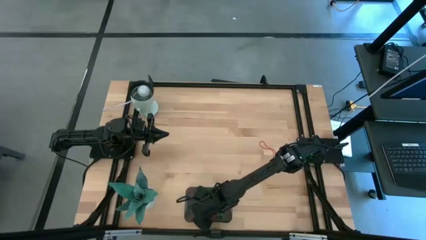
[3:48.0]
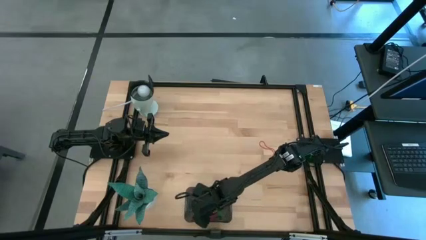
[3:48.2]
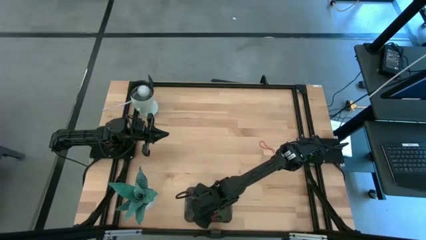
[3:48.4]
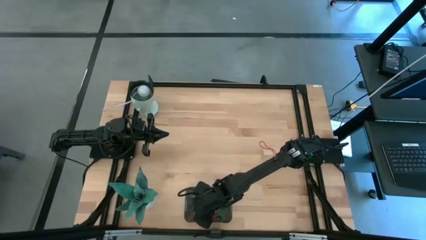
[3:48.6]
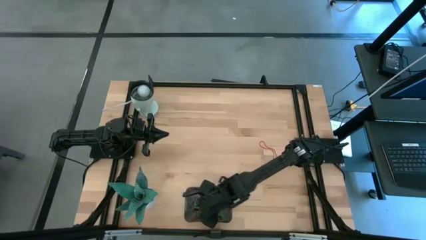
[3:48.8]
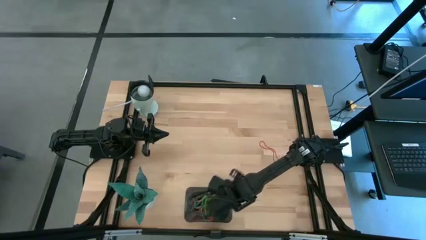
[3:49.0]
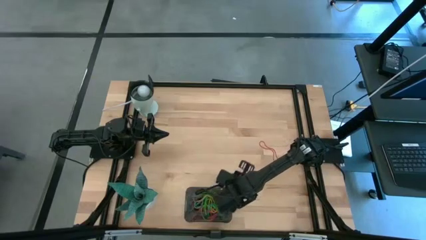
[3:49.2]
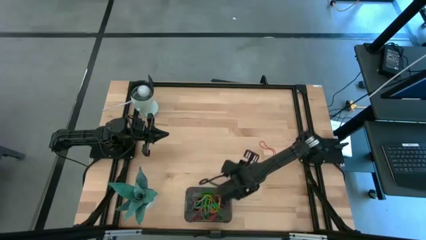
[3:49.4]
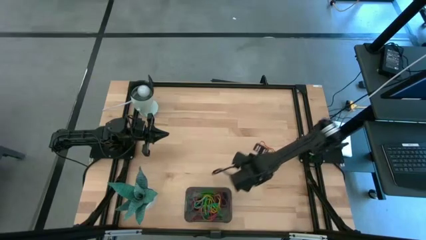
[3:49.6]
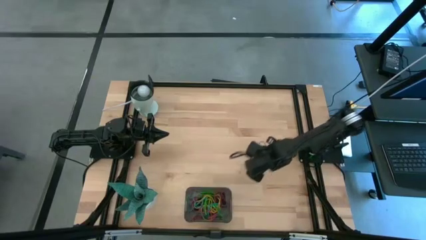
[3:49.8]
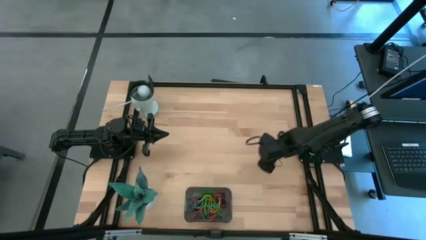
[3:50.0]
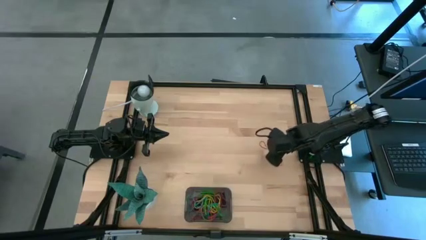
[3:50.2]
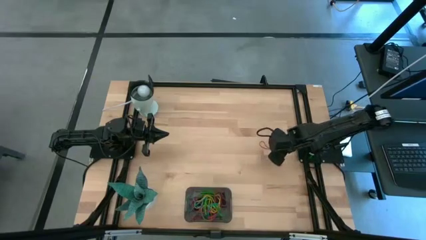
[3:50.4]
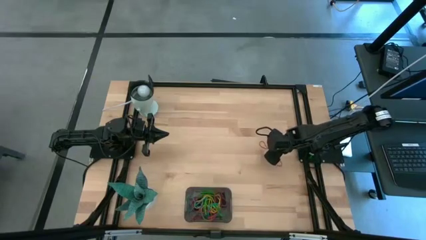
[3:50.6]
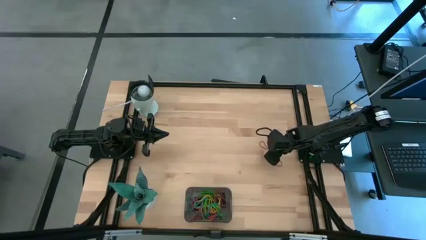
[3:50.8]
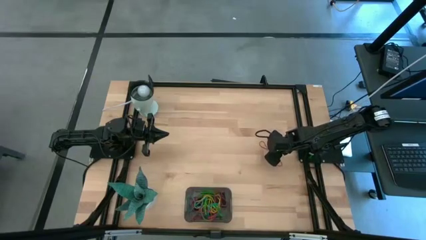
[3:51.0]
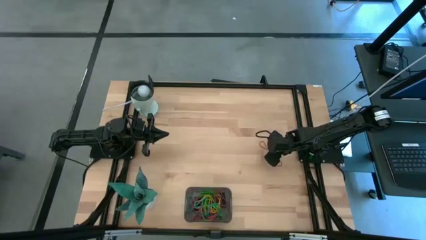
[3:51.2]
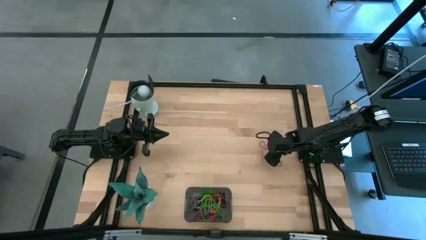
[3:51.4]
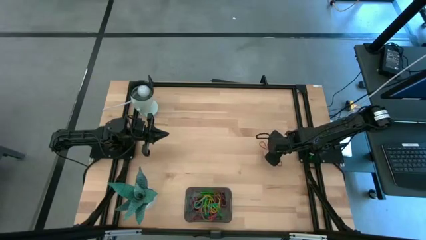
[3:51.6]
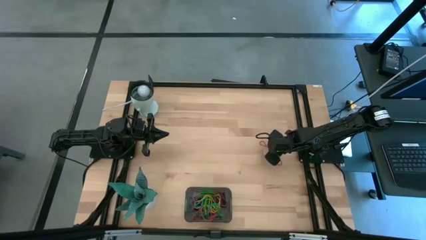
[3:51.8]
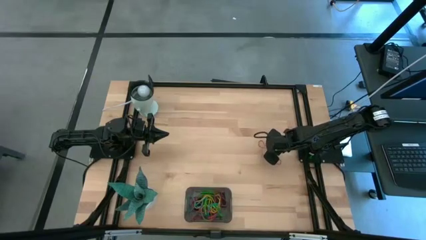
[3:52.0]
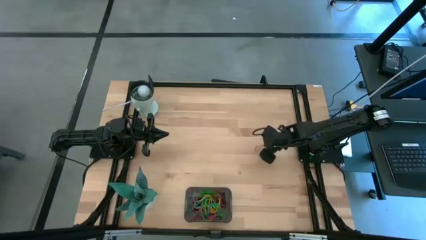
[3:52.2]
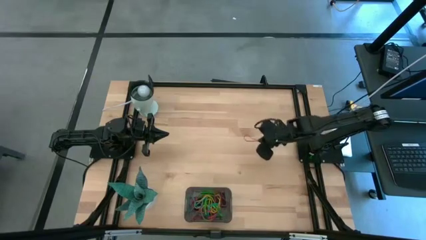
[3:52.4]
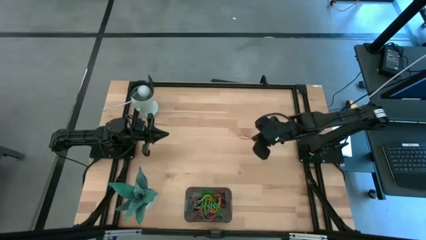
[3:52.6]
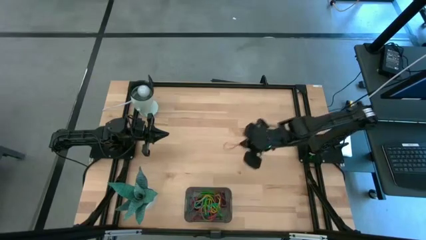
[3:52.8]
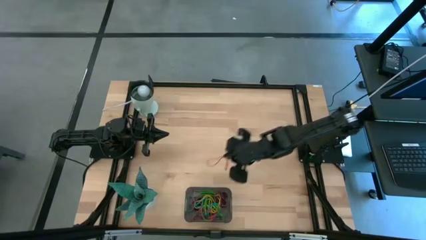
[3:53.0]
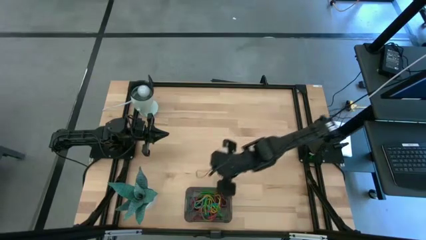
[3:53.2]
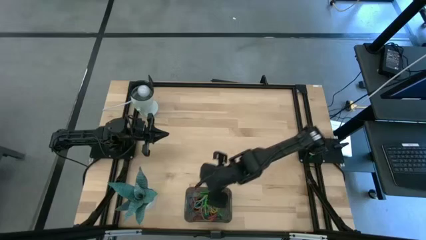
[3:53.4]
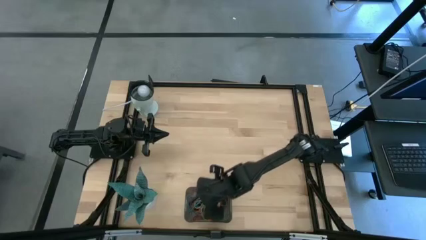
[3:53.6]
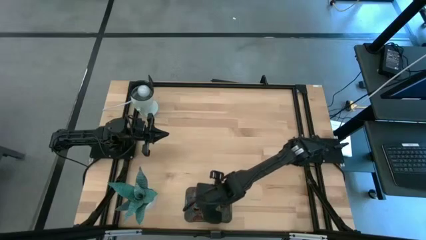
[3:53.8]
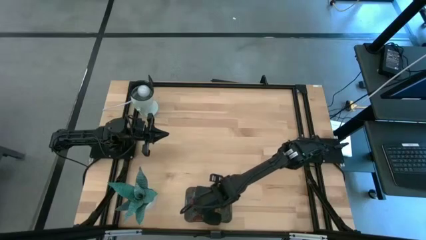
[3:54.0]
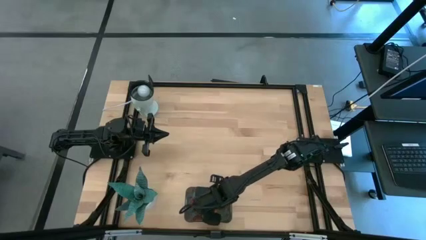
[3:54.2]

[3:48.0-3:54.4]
Task: Pick and place rubber bands into bin
Put the red rubber band into the black bin

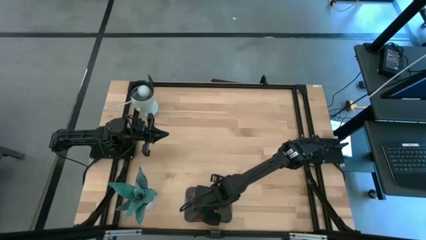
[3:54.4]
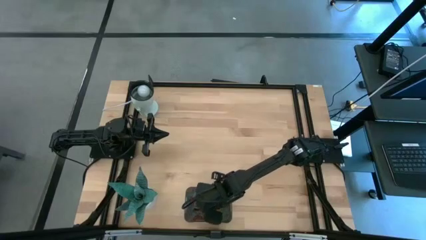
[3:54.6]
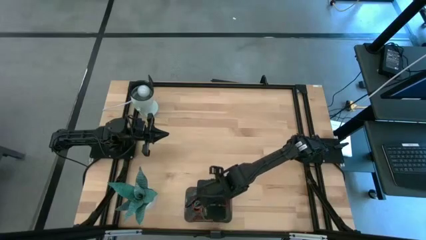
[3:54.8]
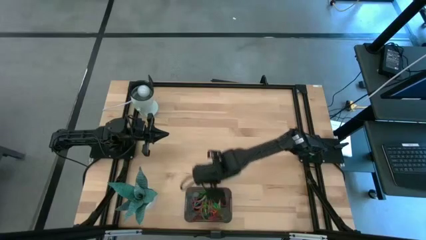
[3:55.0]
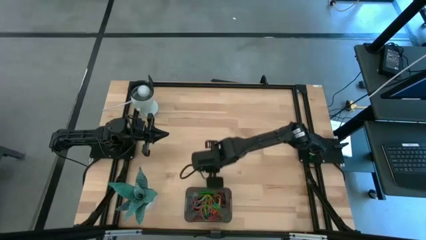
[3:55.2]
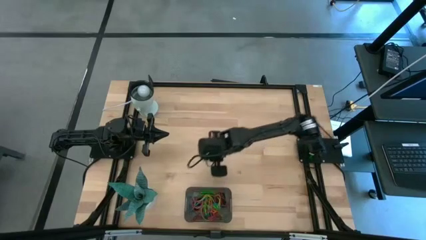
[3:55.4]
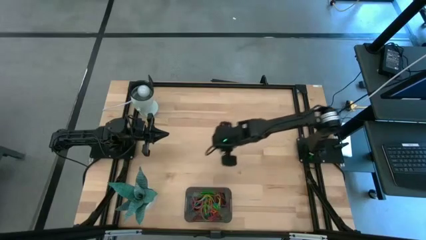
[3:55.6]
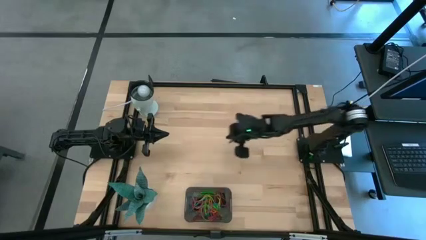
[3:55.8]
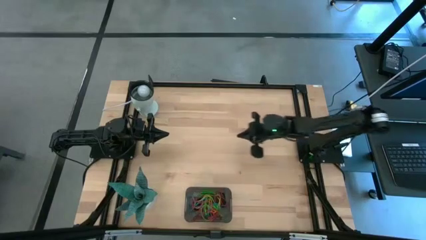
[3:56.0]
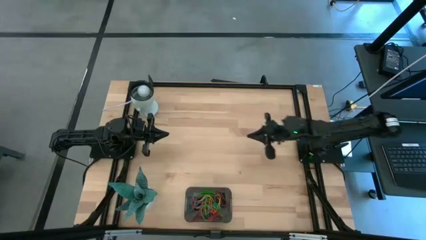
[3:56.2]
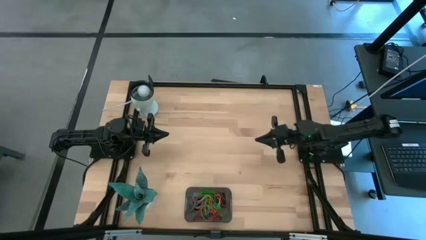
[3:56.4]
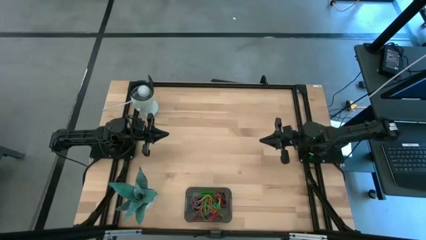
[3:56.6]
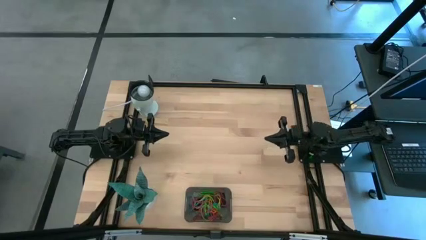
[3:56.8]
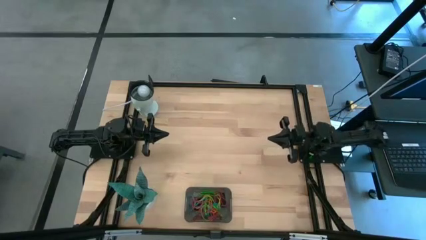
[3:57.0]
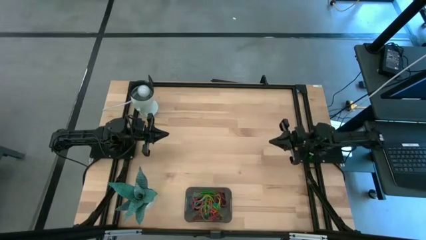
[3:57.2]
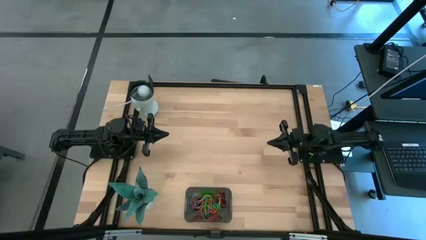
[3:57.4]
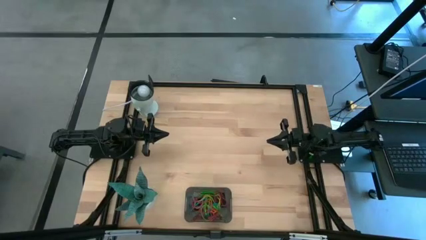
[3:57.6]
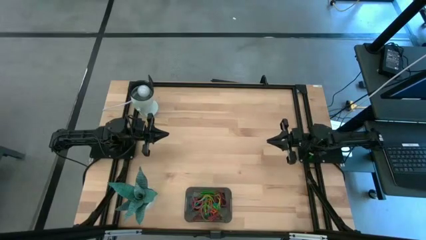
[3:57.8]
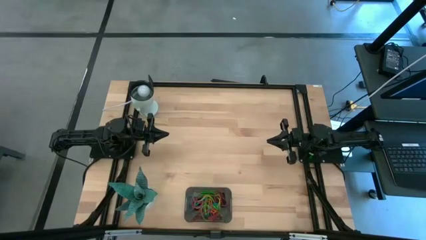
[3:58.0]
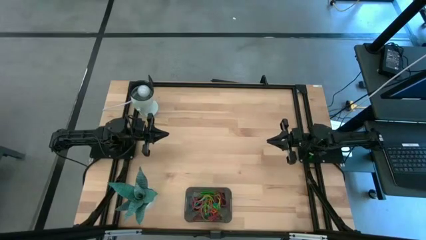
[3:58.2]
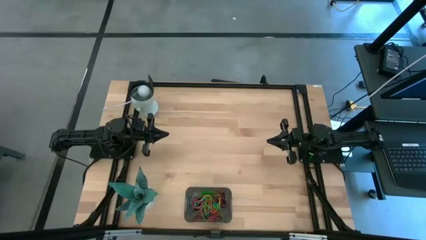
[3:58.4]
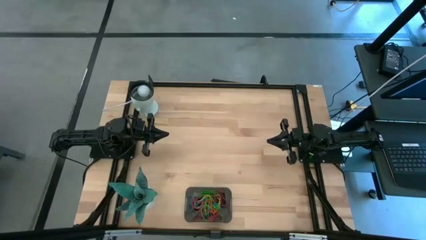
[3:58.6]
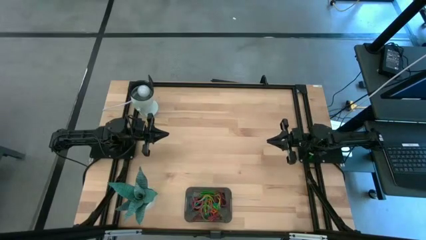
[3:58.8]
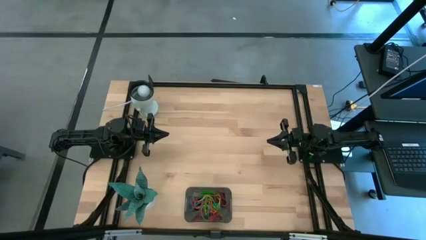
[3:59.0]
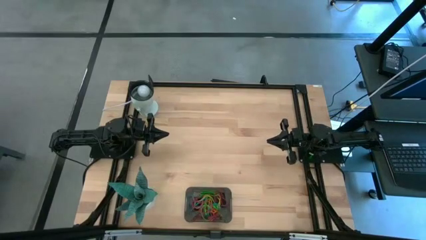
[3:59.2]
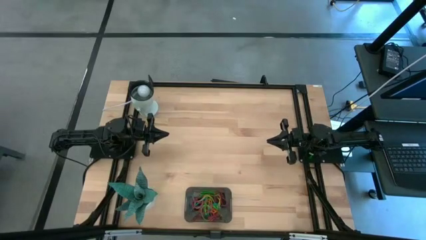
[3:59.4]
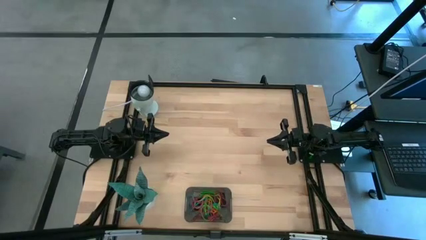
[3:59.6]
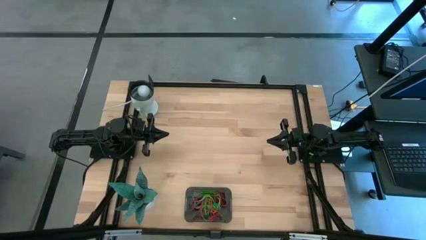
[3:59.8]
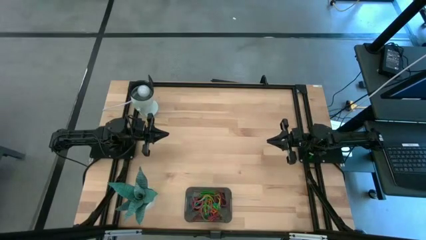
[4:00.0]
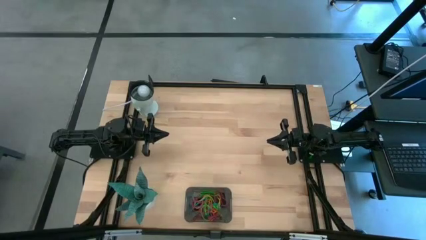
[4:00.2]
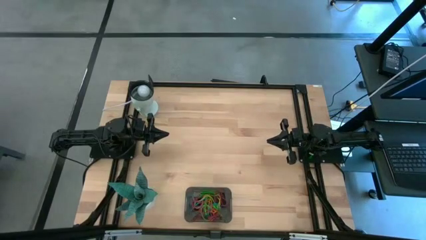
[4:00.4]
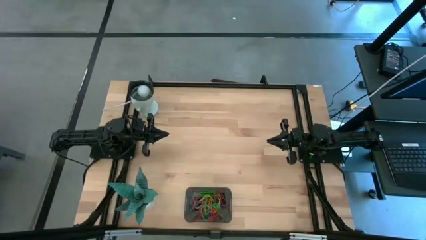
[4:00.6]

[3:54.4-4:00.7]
Return to Home Position

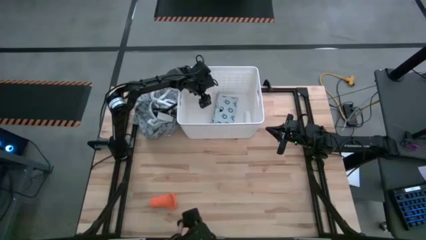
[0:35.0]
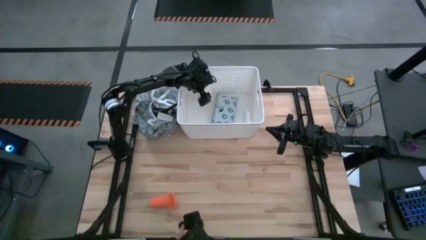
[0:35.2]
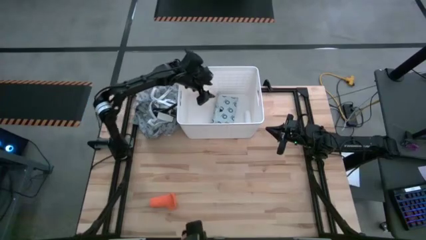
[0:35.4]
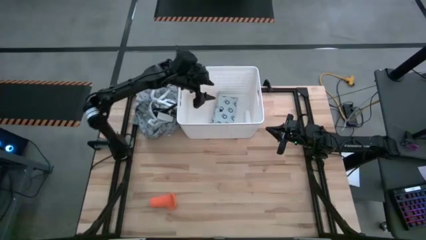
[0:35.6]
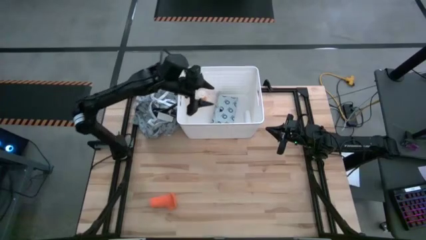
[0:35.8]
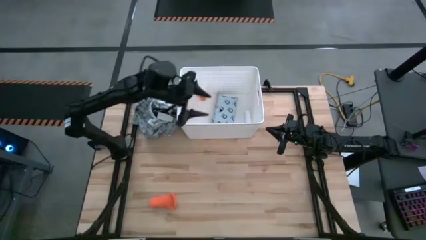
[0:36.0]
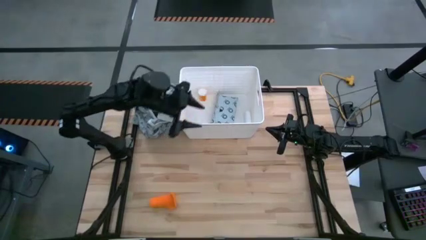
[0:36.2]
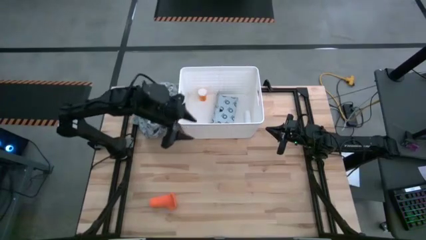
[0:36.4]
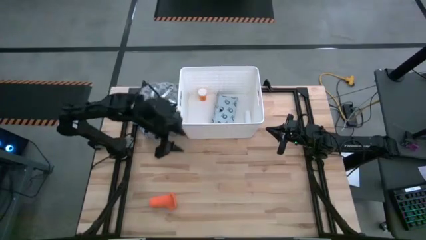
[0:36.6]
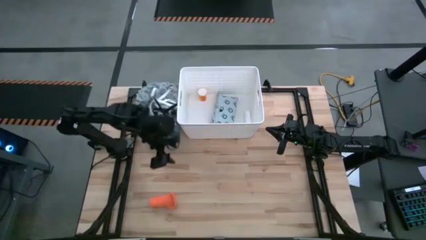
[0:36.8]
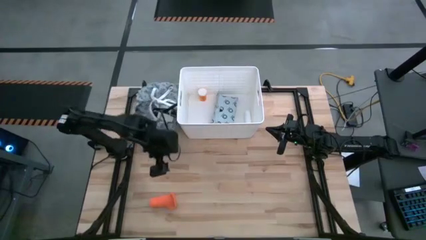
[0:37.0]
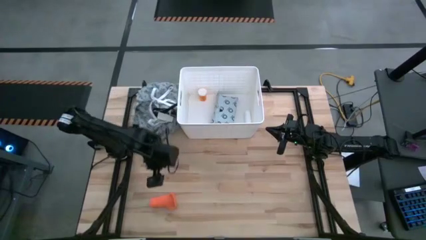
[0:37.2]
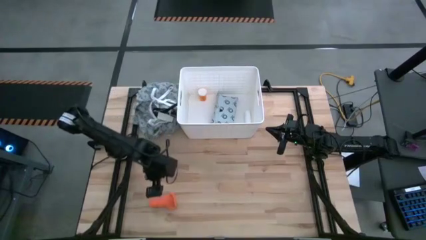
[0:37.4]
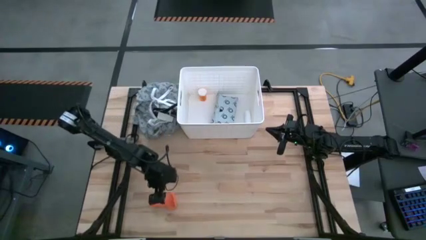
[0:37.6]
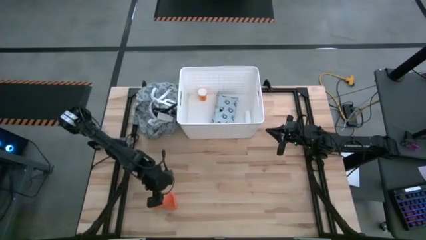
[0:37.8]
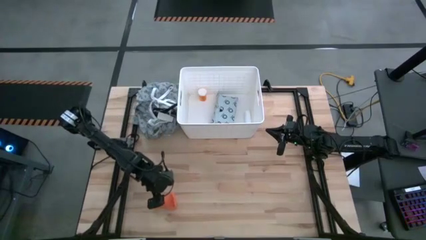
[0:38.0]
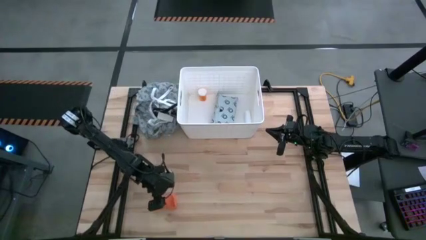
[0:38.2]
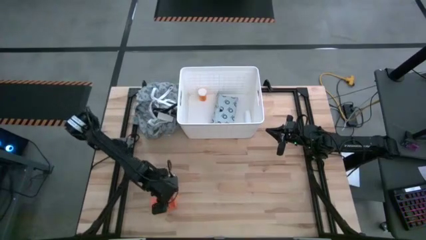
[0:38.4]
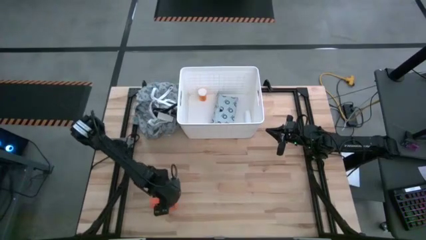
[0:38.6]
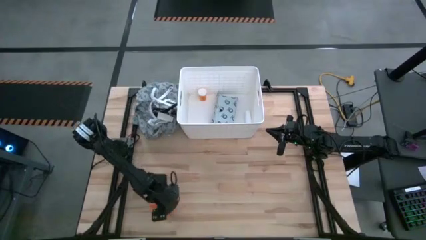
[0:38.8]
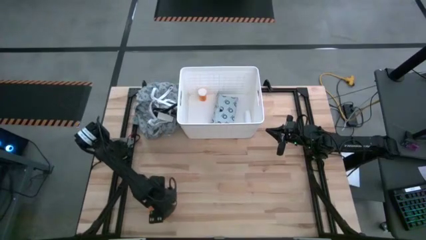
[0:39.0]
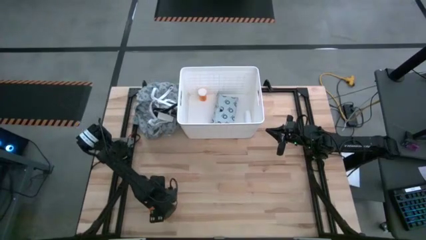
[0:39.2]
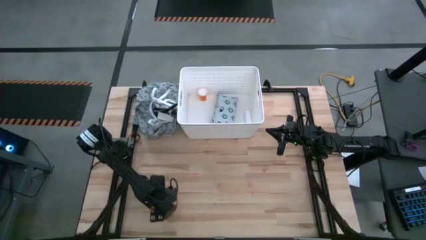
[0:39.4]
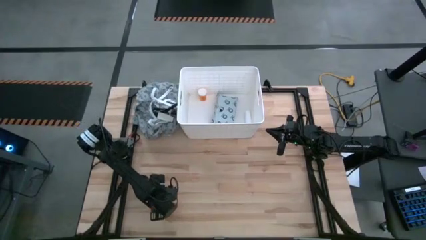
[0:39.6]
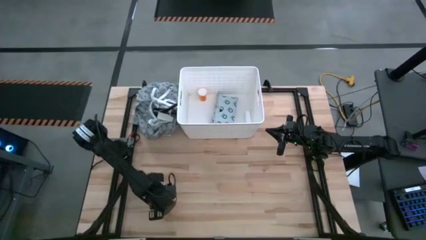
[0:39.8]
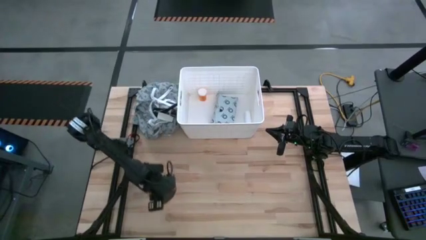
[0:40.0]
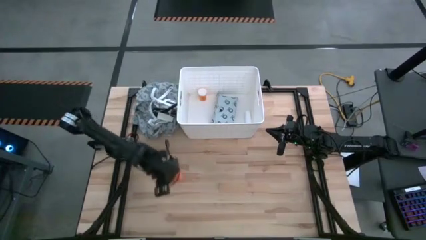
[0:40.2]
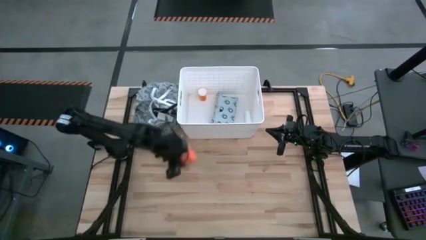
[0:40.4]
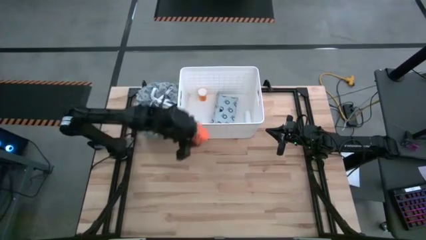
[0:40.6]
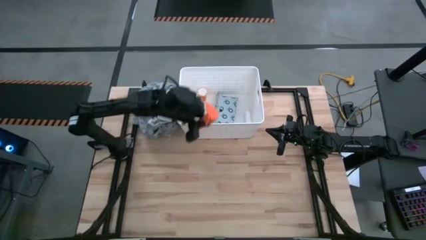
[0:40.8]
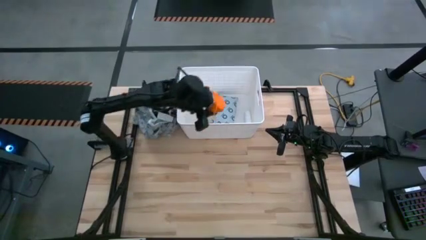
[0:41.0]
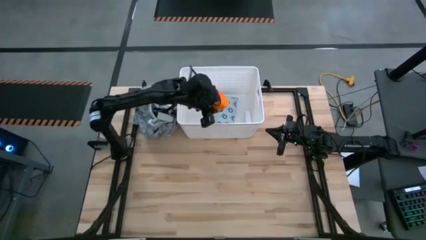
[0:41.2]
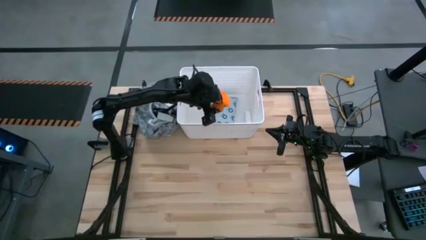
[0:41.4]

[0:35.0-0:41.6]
Task: Pick & place medical supplies in basket/bin
Put the orange bandage into the white bin
